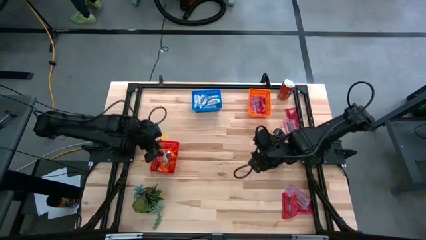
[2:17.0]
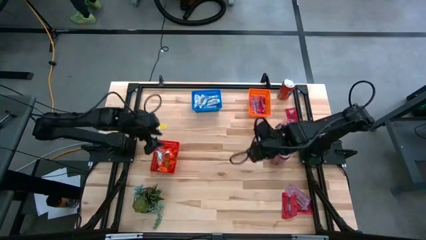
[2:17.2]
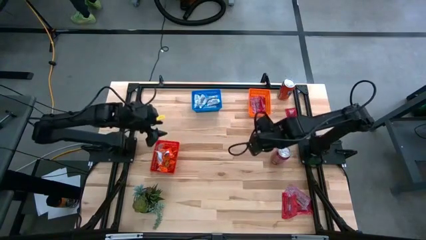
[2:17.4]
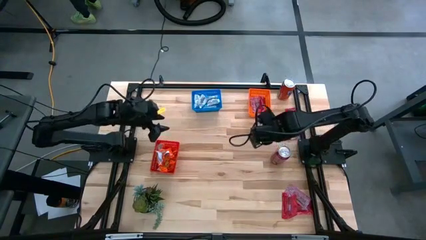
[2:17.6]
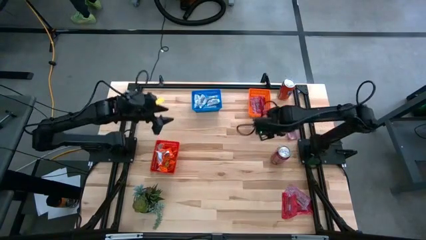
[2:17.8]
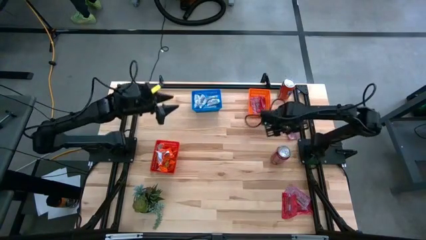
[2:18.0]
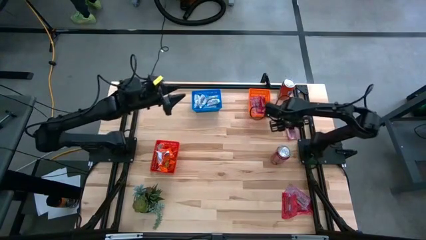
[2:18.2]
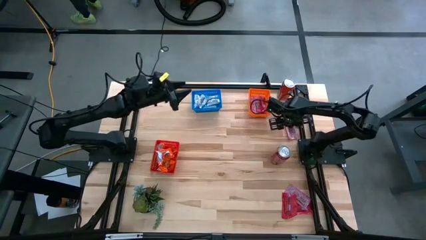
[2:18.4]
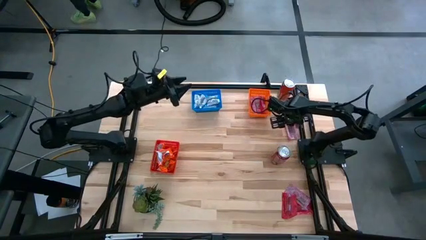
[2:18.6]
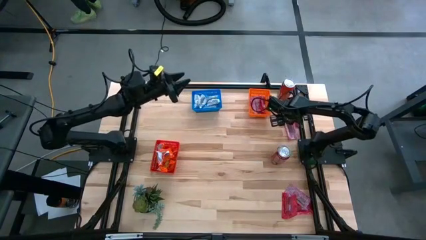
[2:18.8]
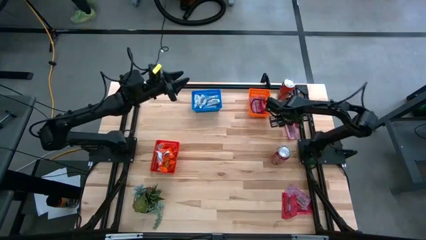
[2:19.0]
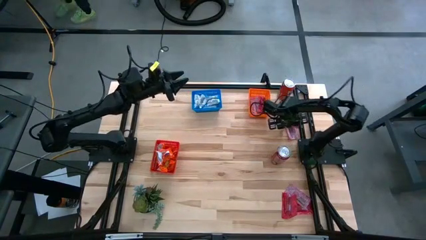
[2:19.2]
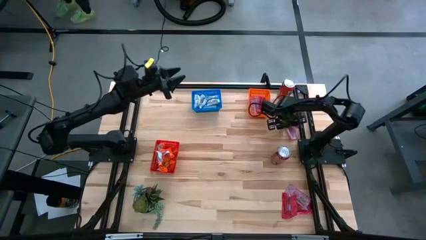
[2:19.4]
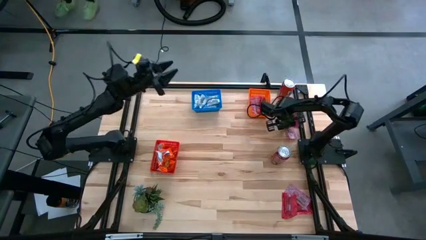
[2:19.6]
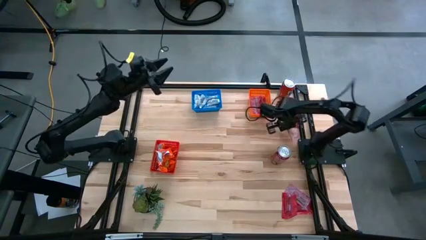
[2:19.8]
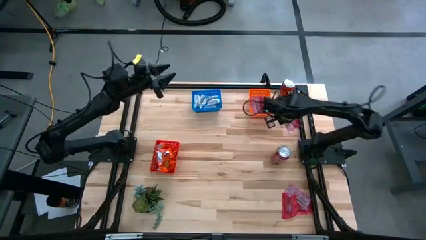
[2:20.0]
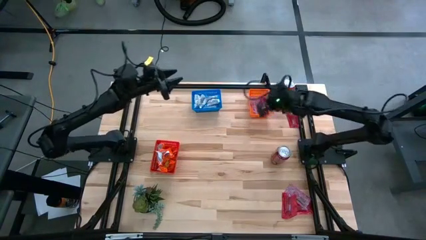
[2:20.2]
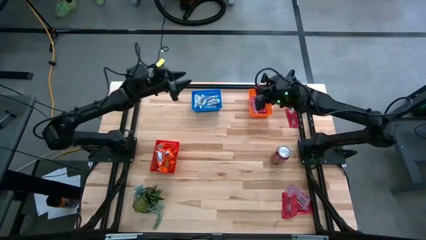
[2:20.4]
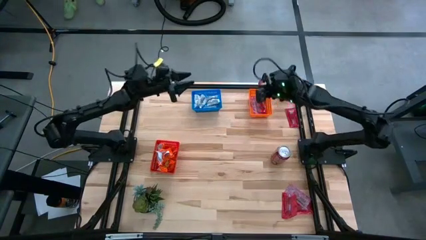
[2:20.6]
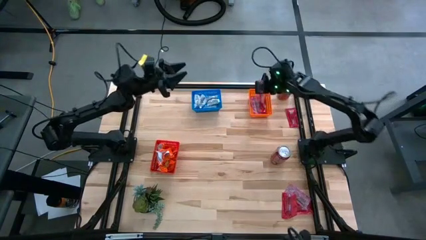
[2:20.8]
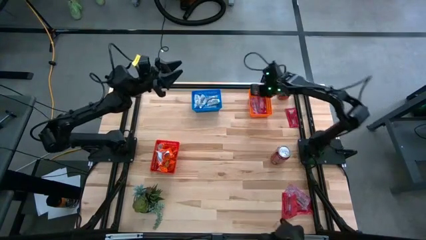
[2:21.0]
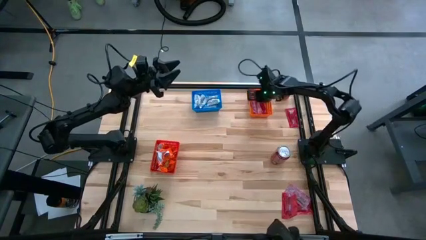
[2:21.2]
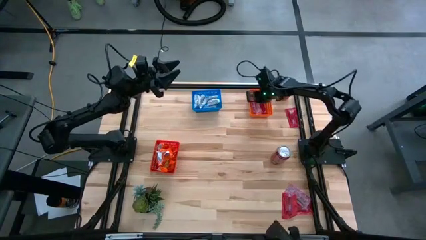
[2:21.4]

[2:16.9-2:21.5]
Task: Sort candy
Put the red candy pack into the orange basket

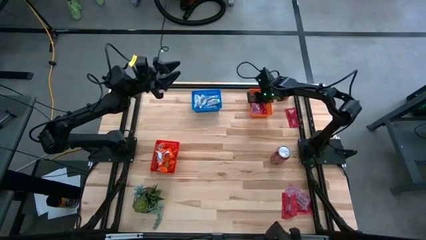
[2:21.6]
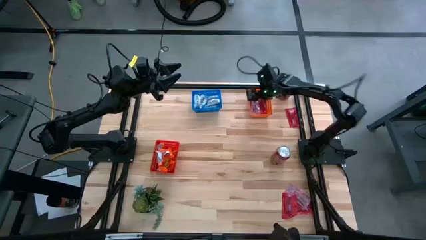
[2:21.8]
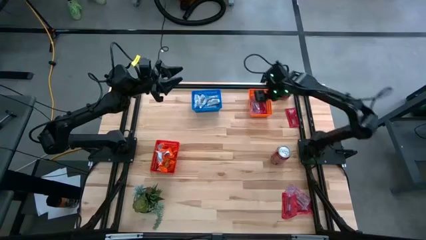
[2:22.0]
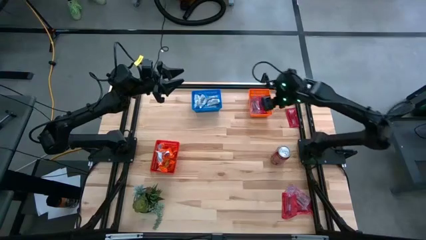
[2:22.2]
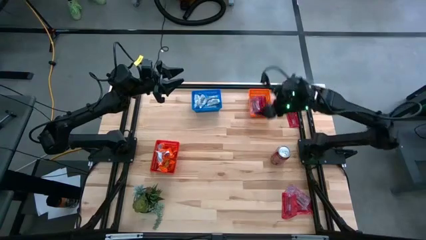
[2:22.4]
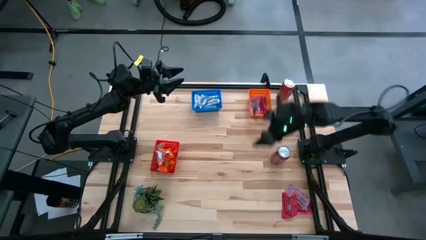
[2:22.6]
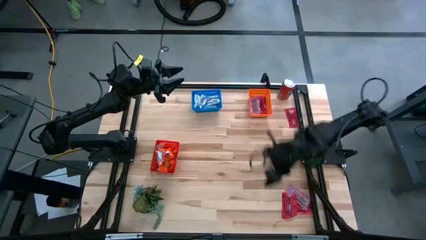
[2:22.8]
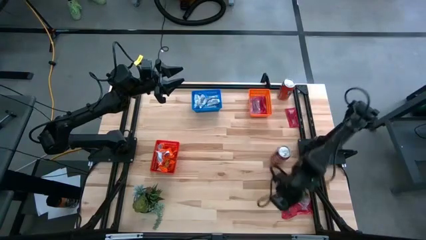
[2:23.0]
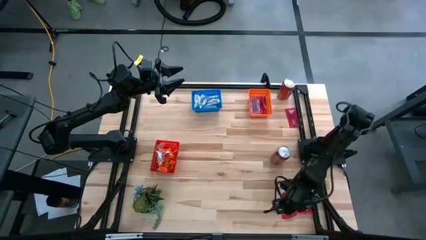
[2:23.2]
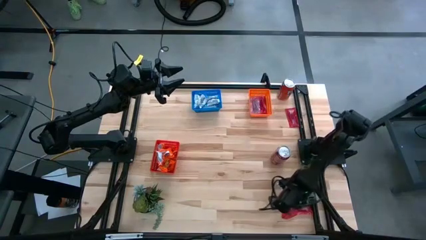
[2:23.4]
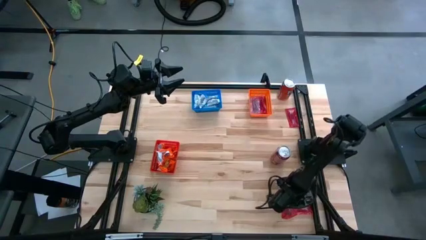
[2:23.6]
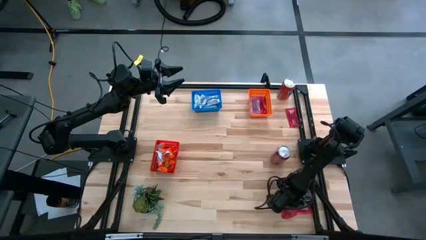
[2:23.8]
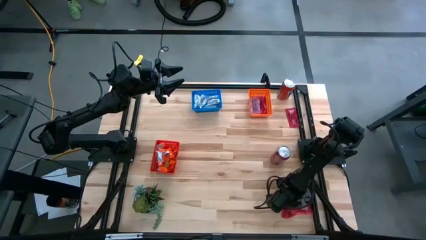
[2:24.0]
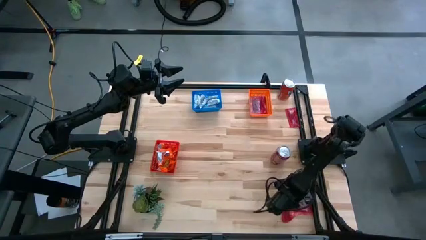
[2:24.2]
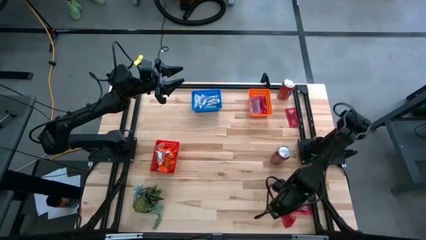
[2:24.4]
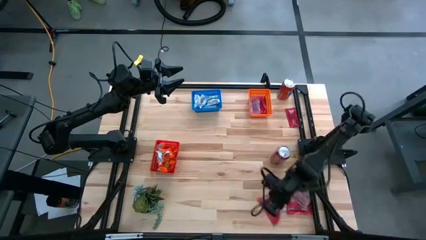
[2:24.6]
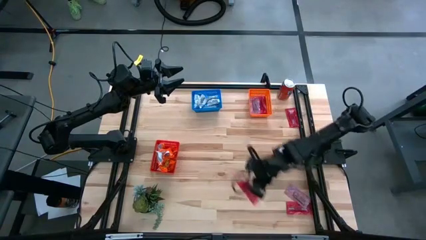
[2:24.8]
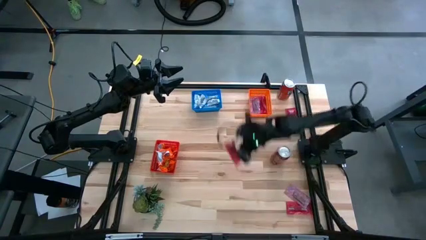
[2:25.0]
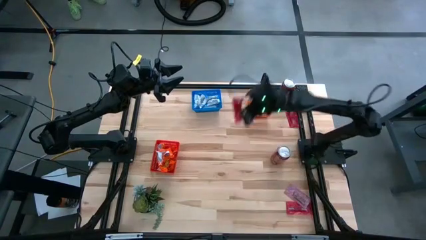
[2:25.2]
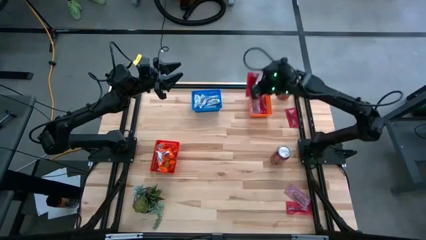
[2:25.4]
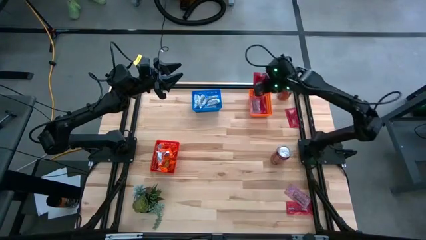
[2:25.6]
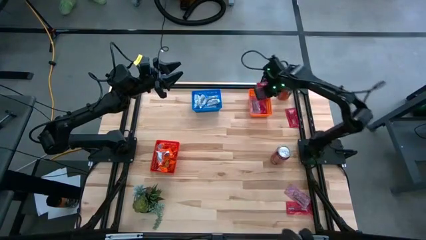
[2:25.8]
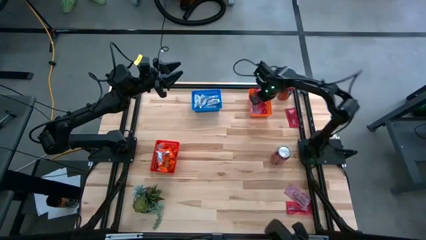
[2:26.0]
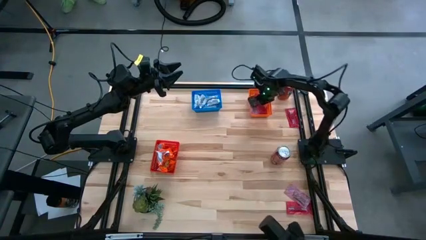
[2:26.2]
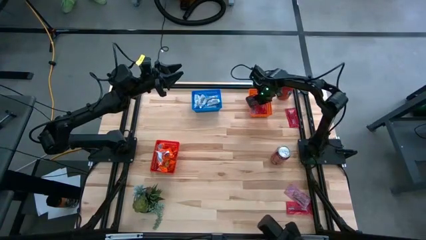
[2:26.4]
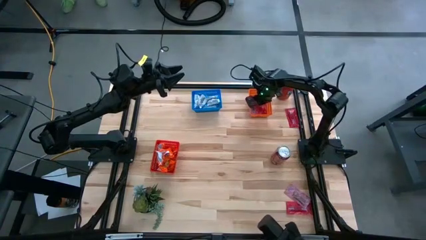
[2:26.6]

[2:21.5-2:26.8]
Put the red candy pack into the orange basket

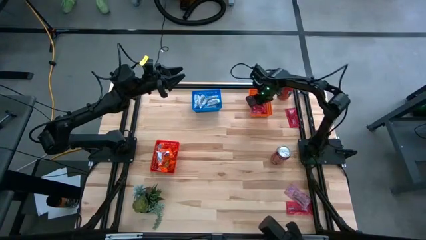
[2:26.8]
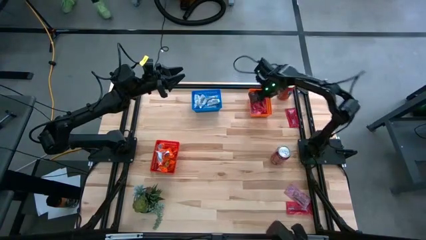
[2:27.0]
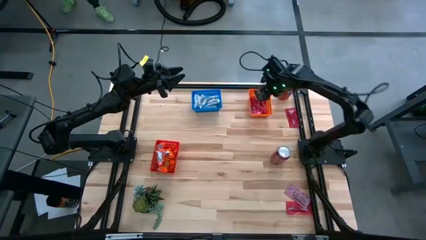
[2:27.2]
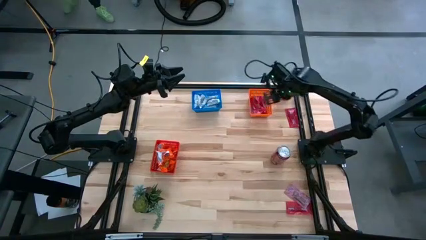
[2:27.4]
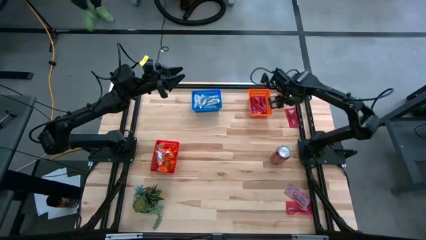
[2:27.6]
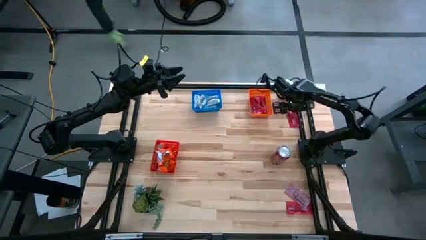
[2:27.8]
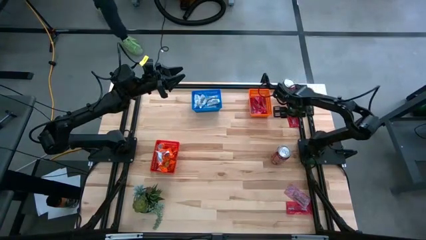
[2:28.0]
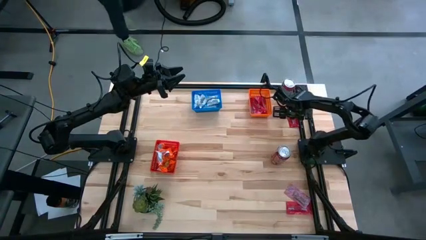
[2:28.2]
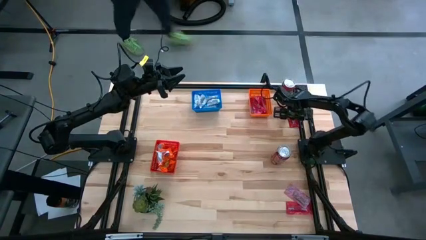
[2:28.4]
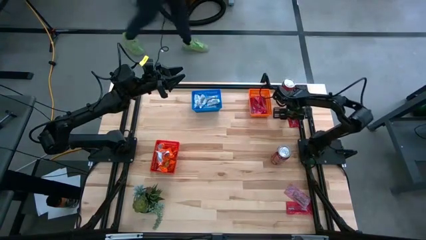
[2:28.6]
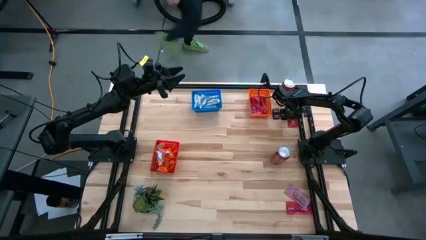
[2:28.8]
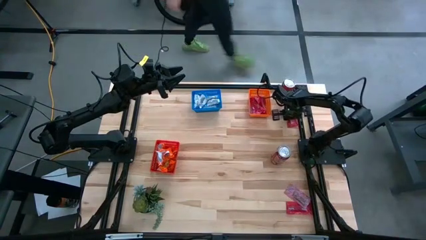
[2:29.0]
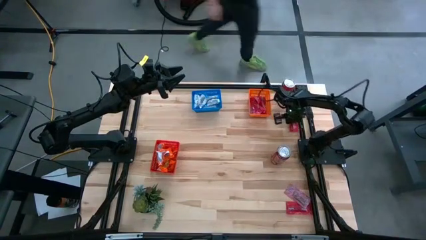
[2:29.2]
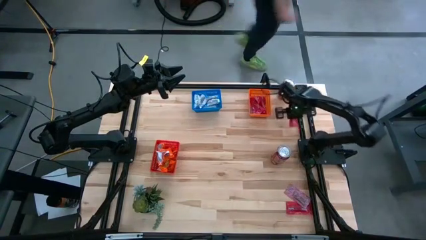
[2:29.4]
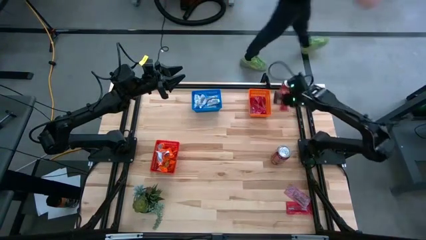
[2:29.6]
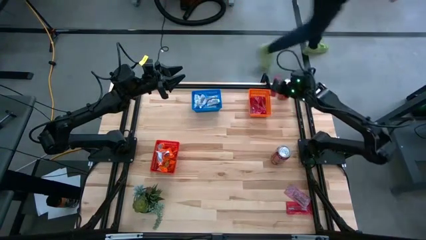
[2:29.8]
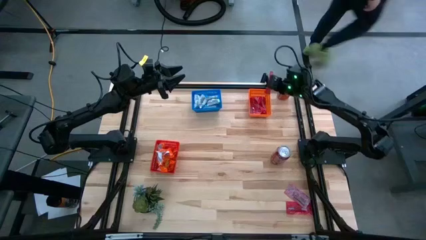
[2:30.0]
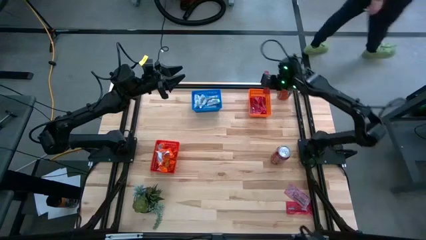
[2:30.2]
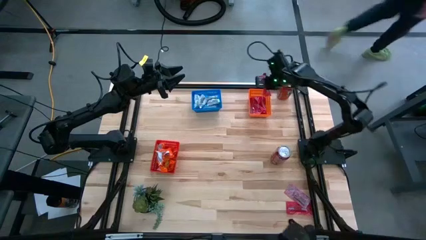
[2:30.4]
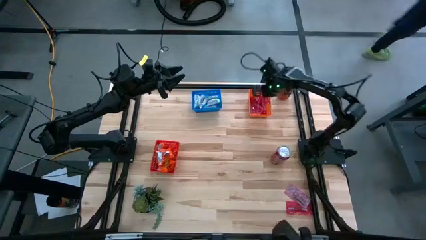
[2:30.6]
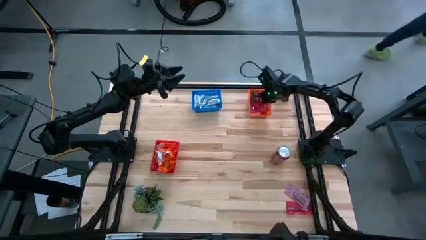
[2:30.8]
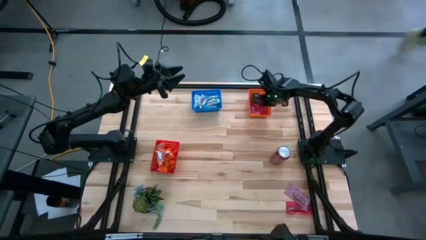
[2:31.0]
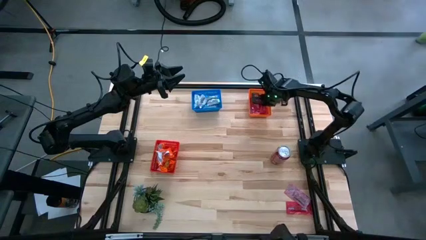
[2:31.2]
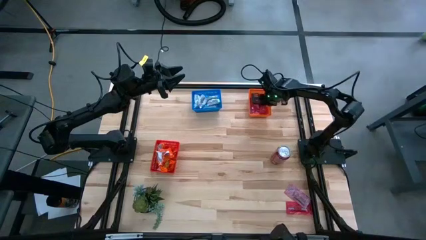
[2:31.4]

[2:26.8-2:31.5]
Put the red candy pack into the orange basket
